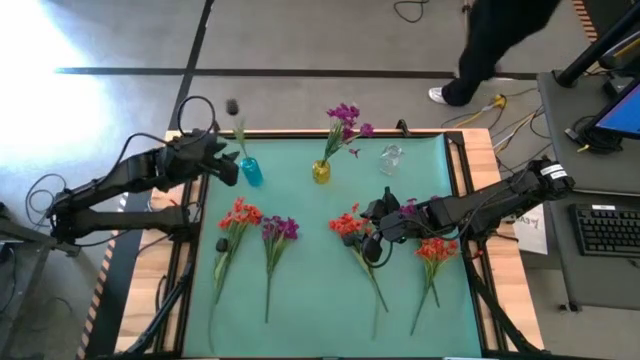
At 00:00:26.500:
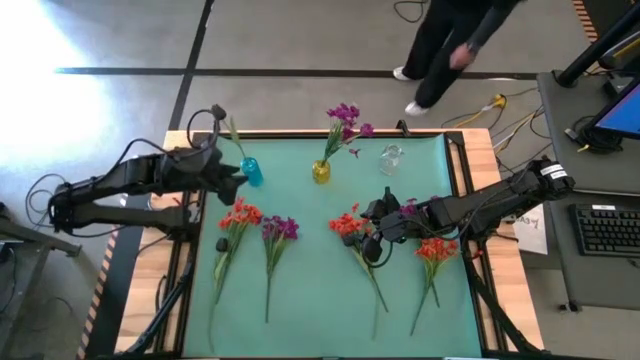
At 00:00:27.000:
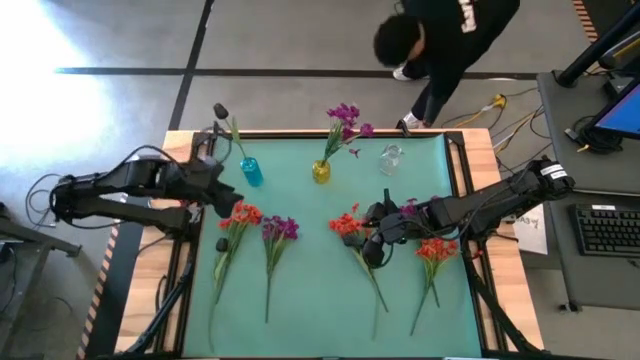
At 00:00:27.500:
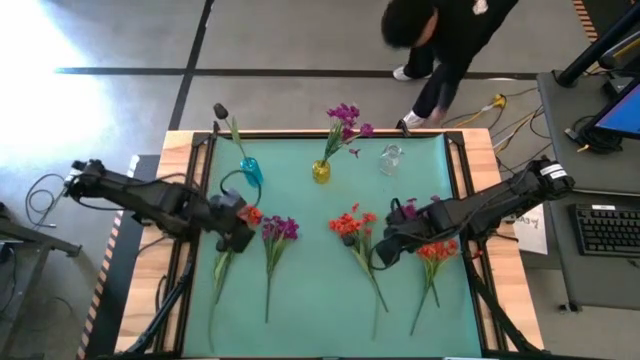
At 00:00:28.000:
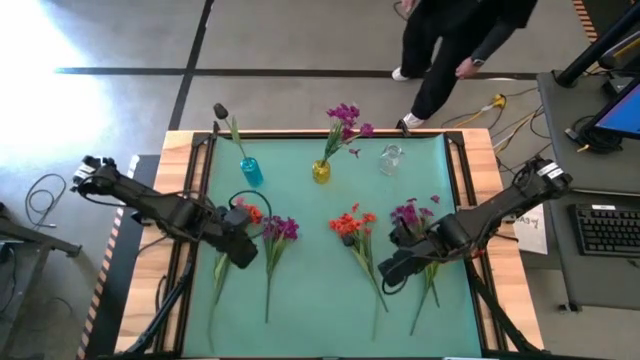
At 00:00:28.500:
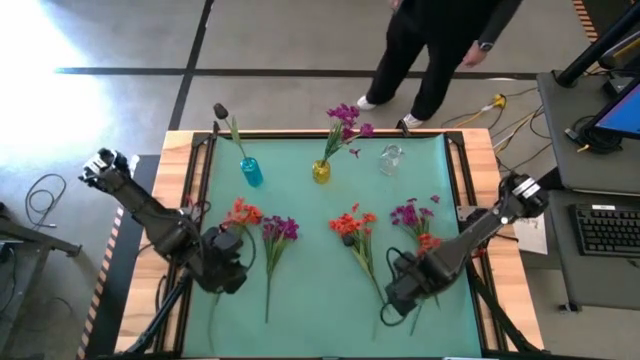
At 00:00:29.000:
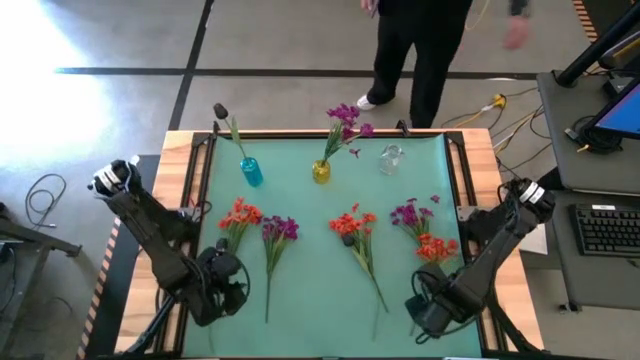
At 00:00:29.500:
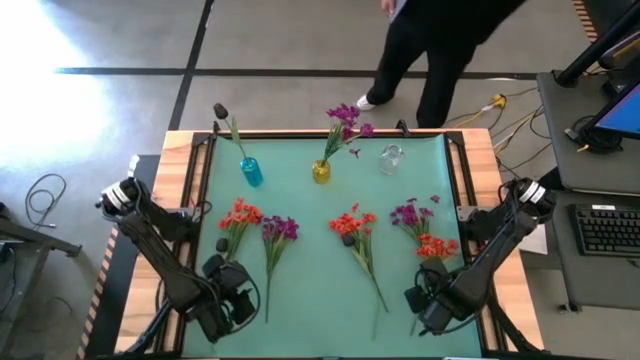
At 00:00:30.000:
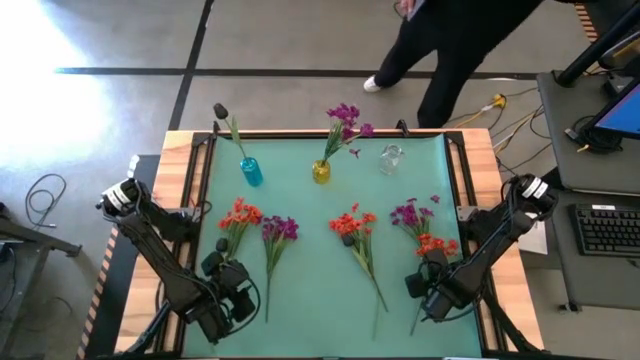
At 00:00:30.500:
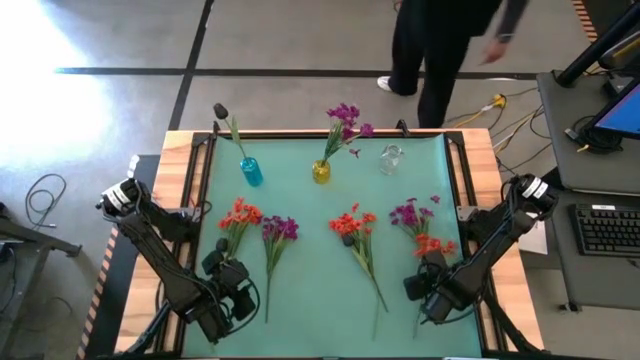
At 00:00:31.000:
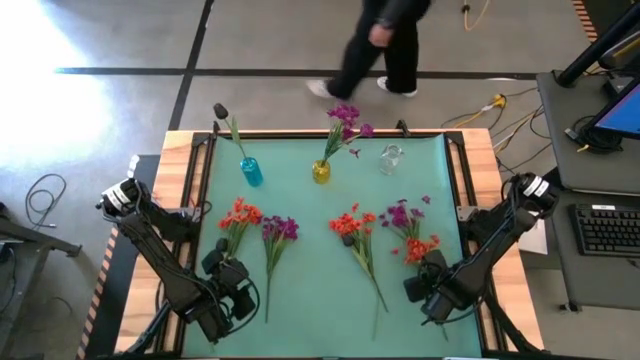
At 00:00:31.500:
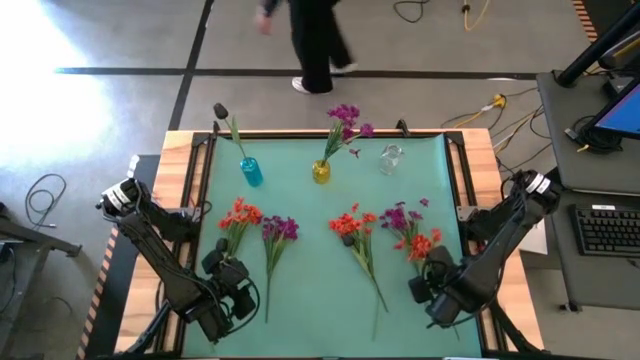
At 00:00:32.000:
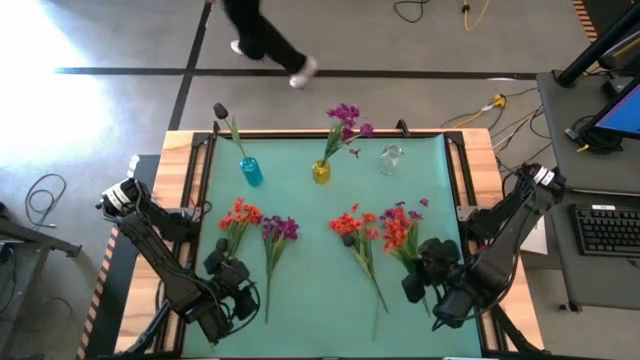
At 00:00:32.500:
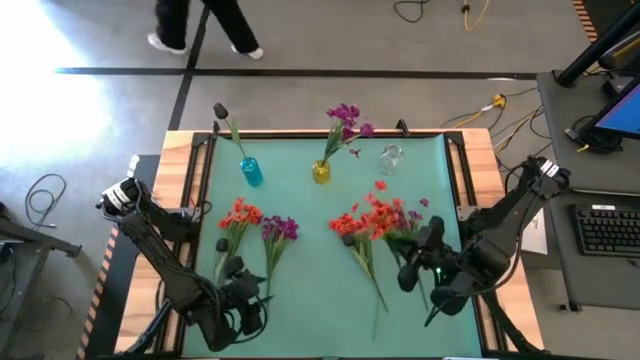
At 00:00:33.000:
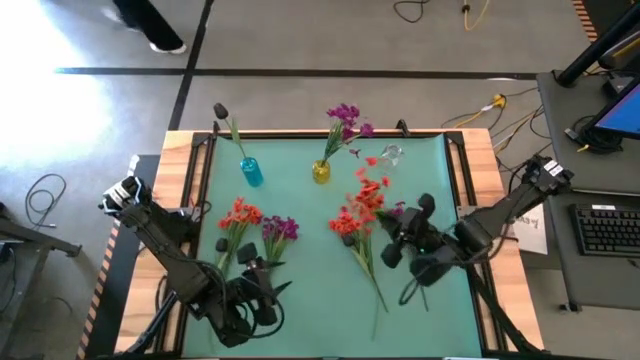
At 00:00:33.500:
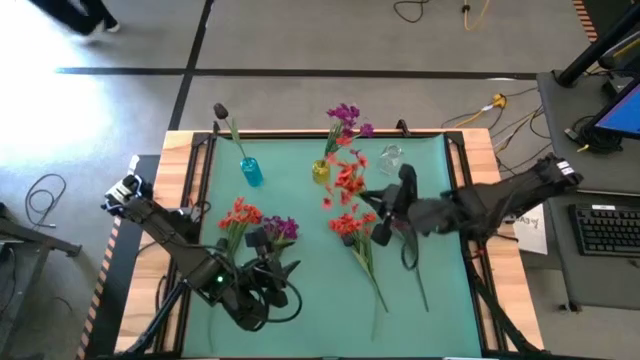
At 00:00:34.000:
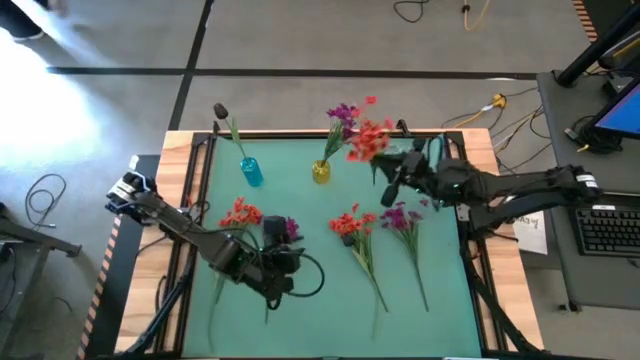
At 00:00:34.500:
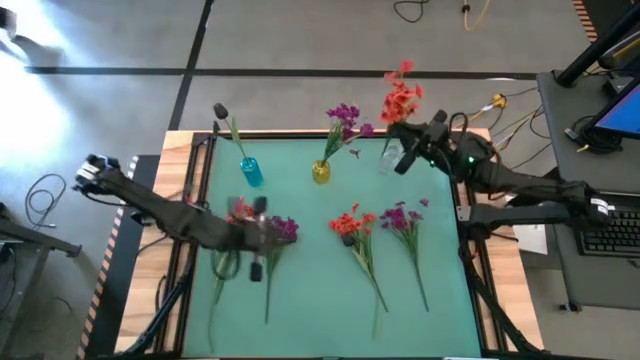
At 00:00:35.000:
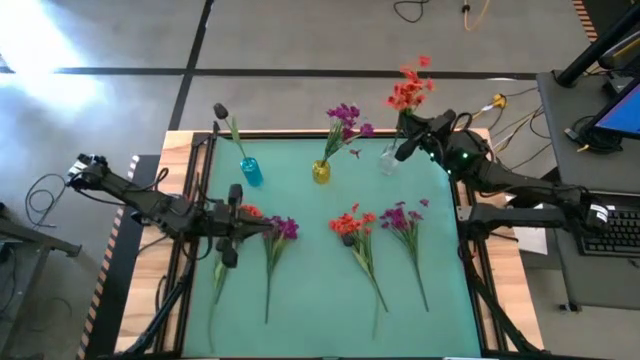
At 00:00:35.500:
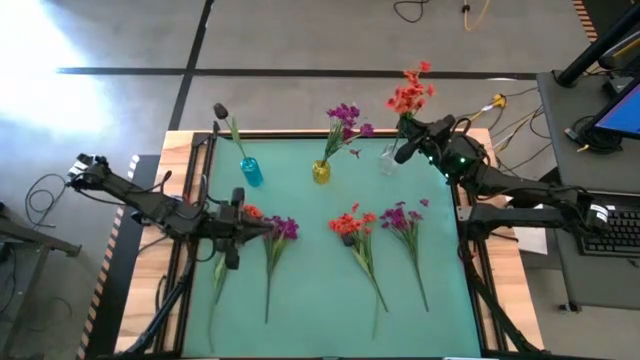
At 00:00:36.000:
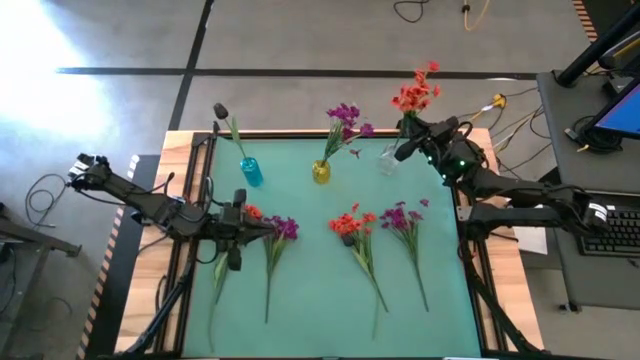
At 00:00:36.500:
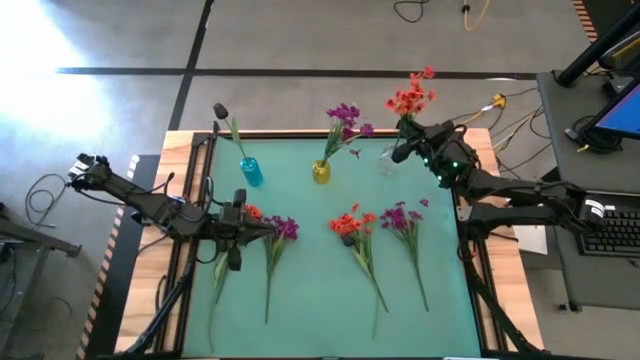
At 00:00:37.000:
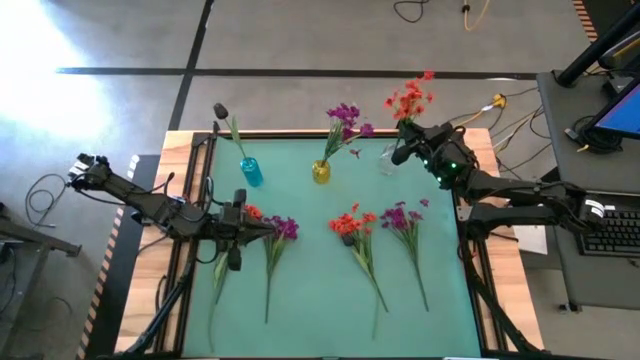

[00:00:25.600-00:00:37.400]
Task: Sort flowers into vase by color
Put the right orange flower into the transparent vase

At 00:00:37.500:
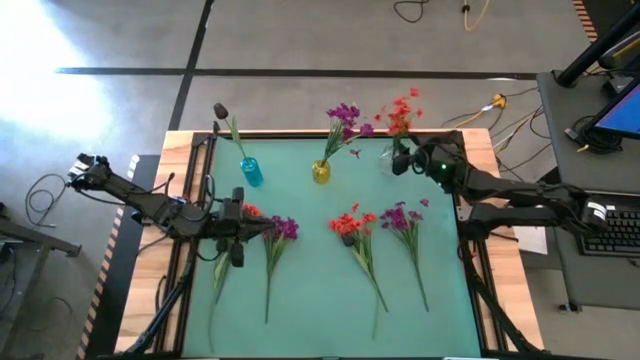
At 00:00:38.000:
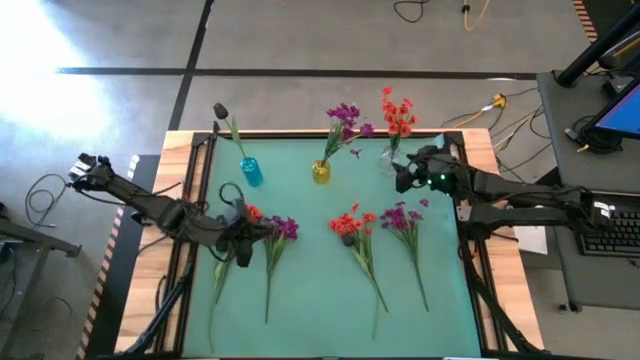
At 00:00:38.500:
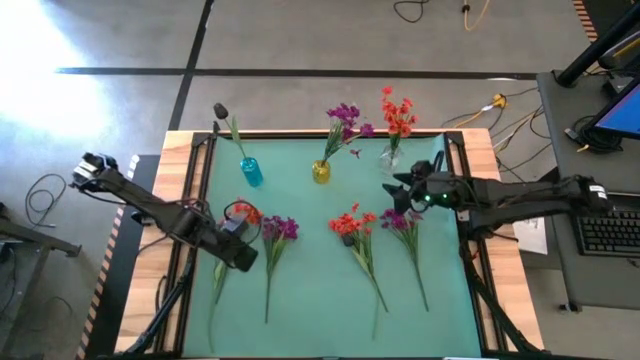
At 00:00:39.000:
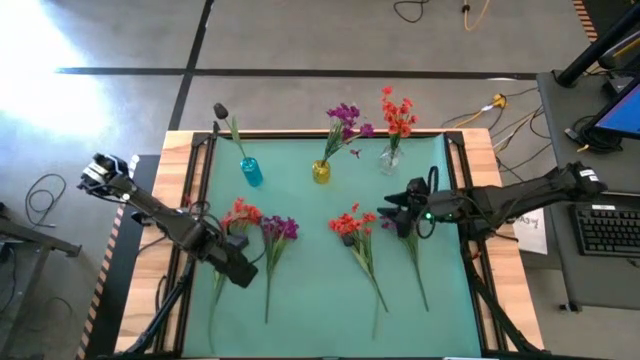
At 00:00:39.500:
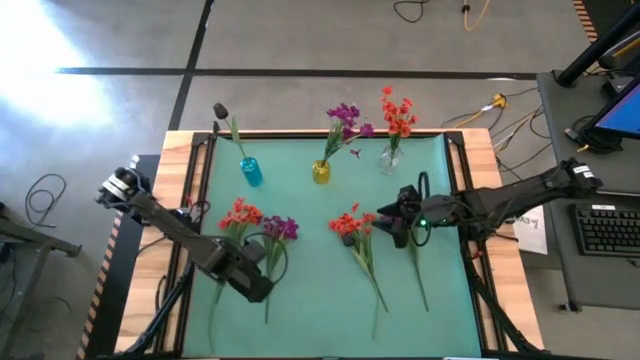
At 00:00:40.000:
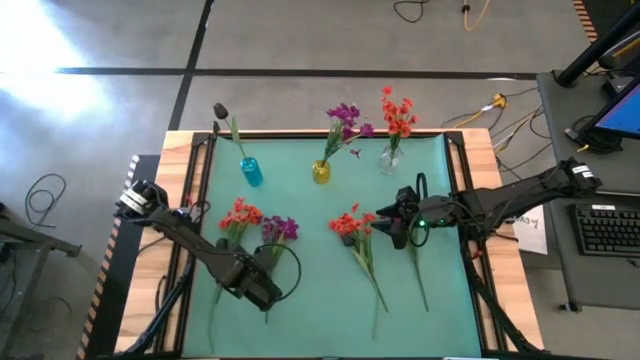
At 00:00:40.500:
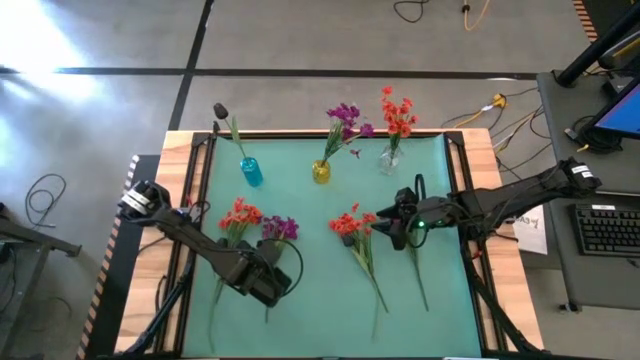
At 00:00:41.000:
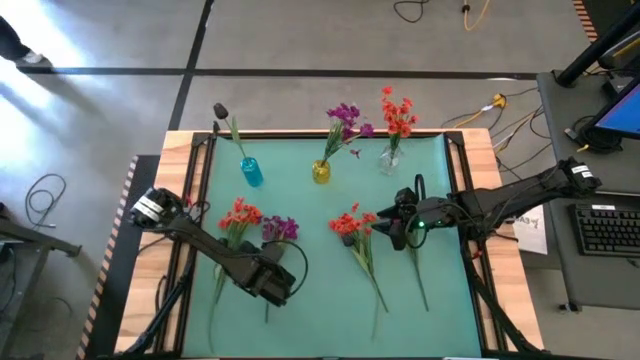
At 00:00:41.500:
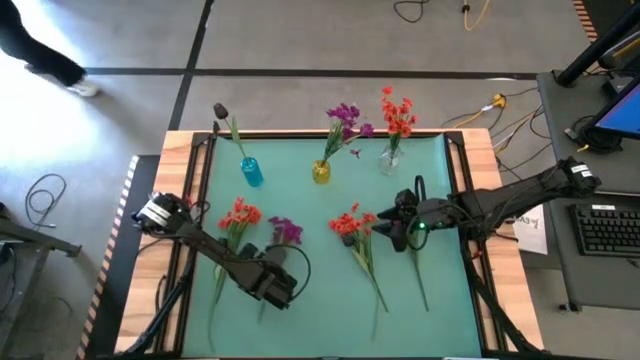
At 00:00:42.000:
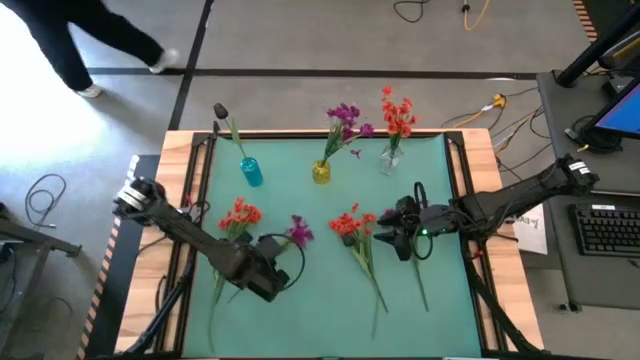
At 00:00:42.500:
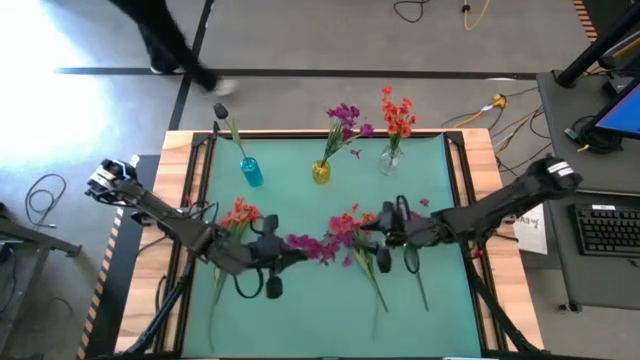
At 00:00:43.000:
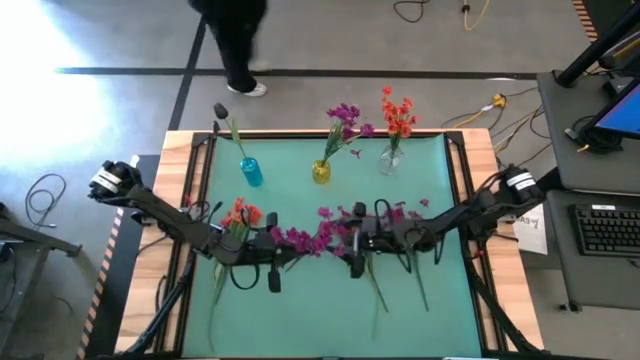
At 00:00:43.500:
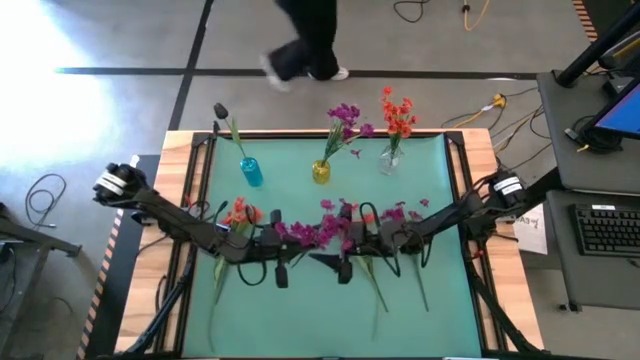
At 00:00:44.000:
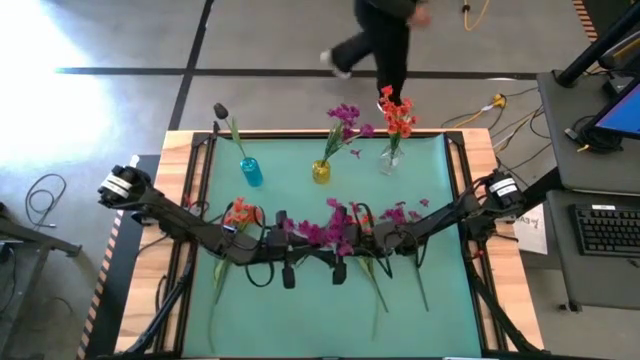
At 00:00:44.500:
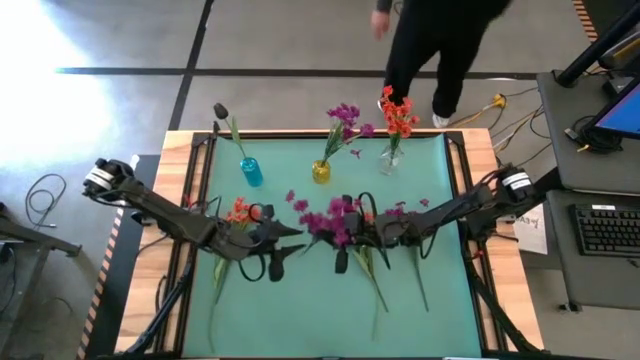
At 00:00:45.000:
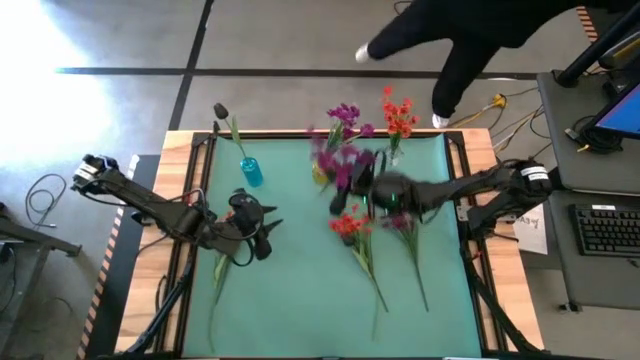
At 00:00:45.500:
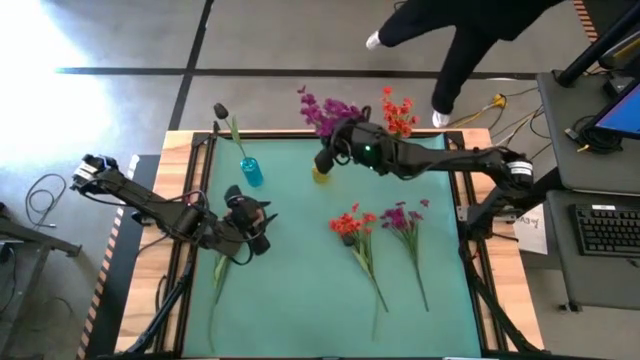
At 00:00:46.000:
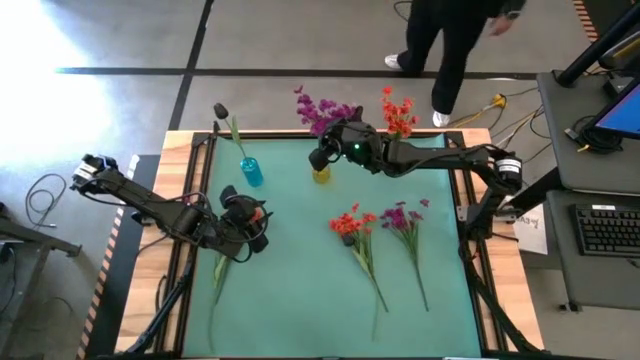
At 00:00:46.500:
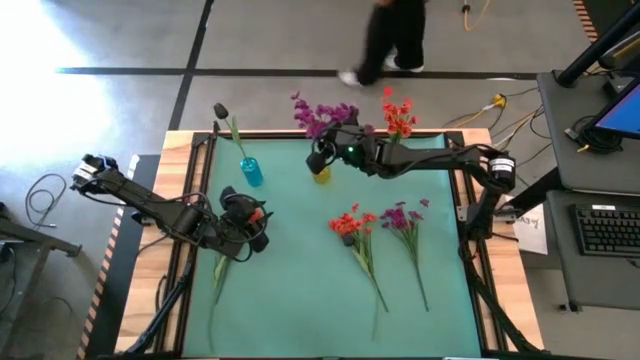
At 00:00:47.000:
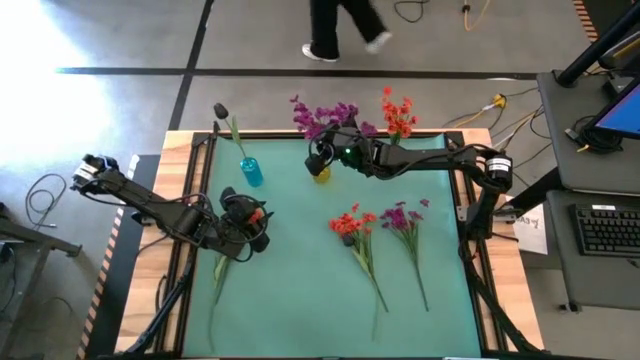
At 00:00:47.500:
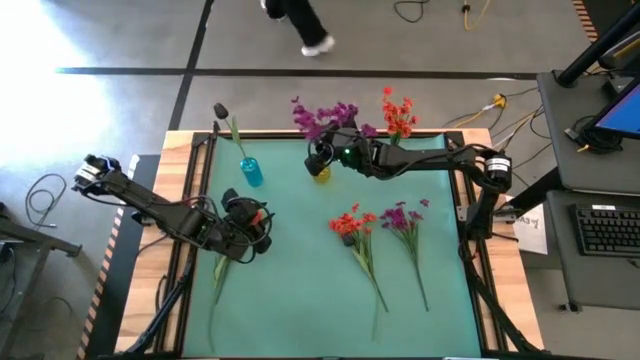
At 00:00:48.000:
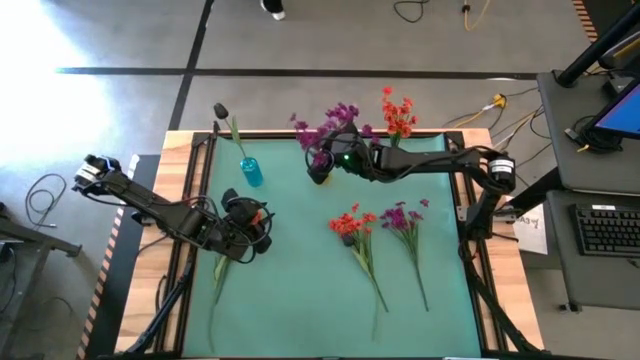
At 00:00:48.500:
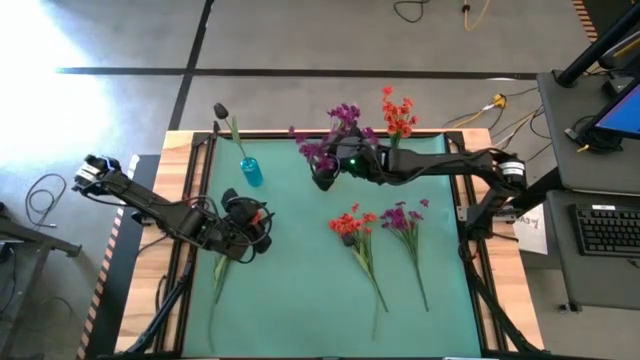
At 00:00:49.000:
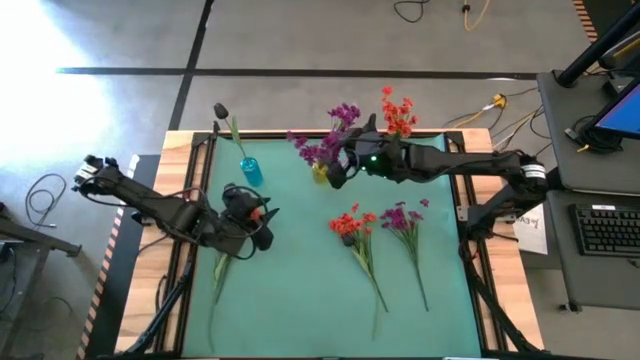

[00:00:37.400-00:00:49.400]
Put the left purple flowers into the yellow vase
